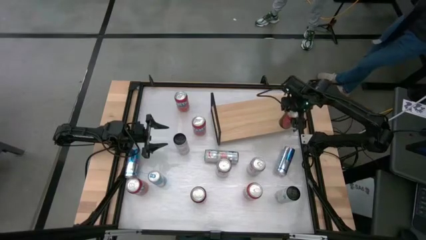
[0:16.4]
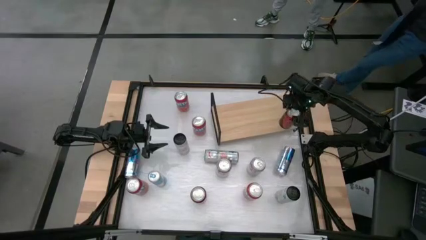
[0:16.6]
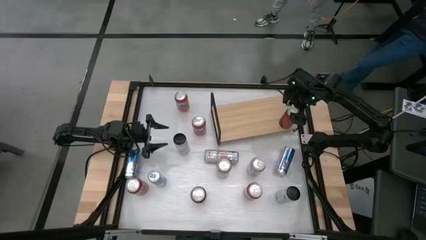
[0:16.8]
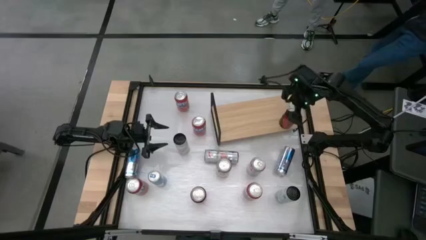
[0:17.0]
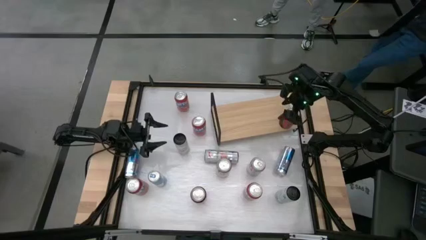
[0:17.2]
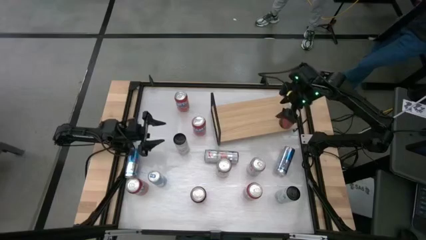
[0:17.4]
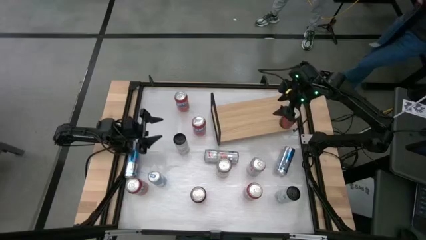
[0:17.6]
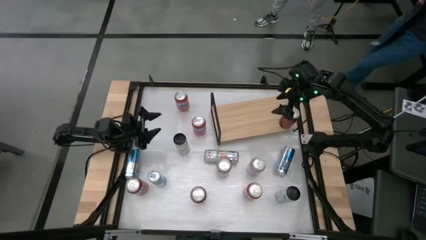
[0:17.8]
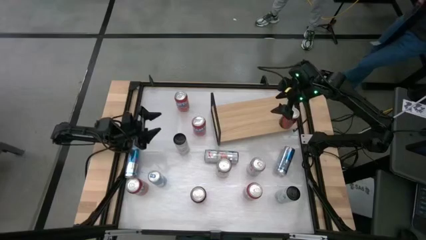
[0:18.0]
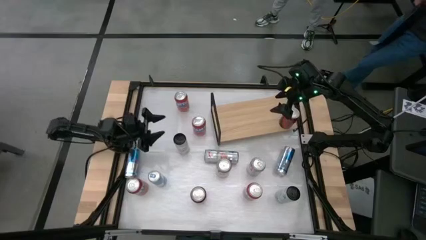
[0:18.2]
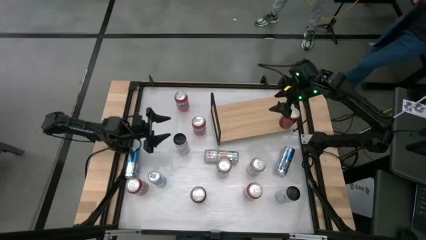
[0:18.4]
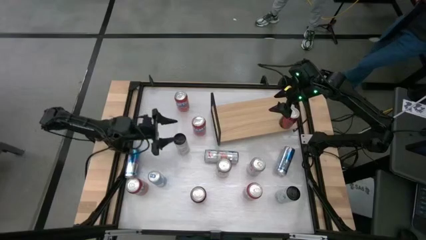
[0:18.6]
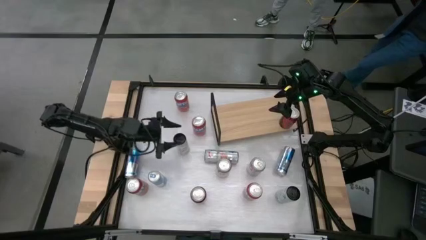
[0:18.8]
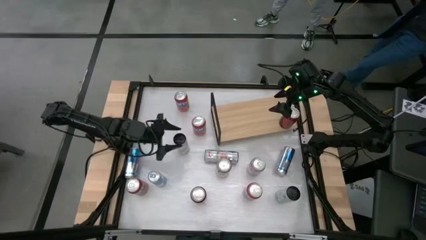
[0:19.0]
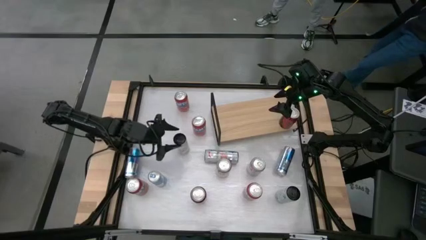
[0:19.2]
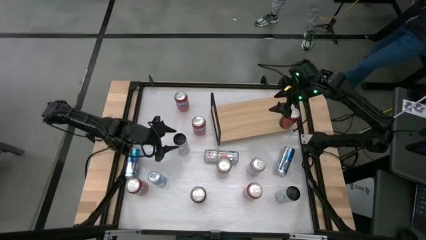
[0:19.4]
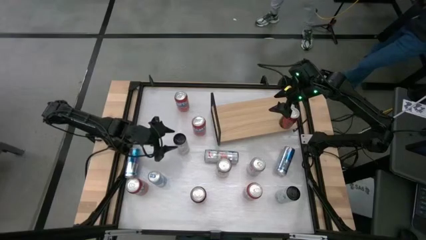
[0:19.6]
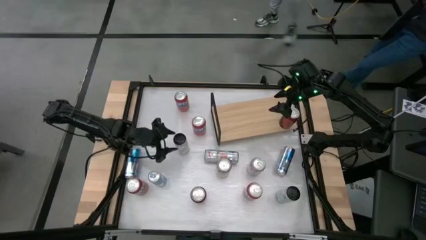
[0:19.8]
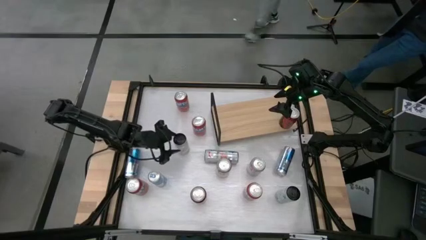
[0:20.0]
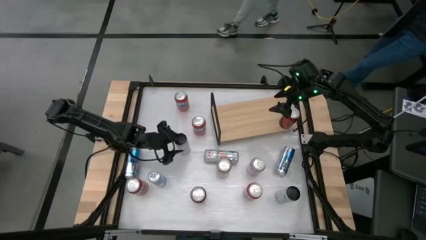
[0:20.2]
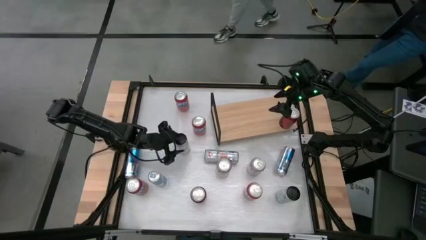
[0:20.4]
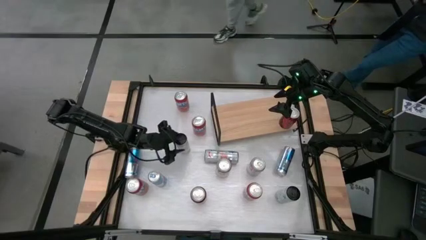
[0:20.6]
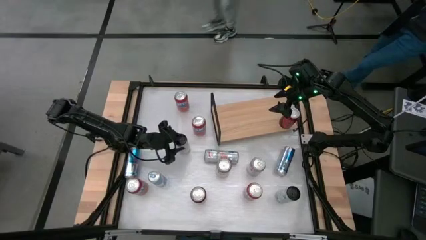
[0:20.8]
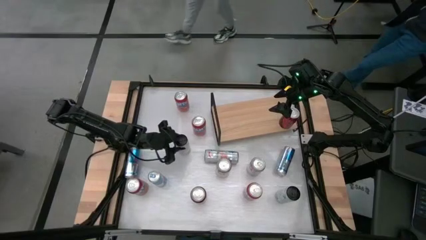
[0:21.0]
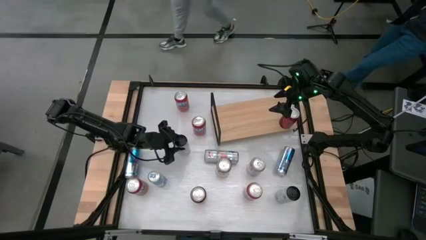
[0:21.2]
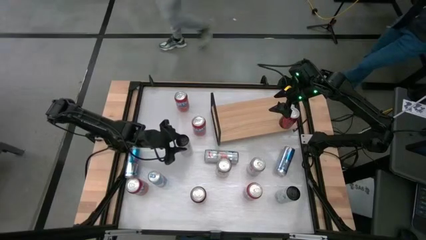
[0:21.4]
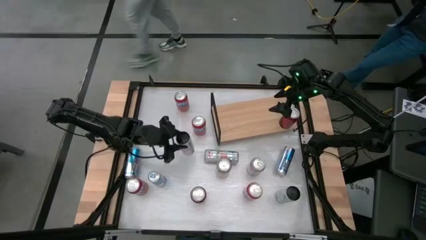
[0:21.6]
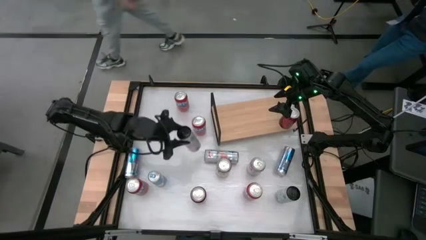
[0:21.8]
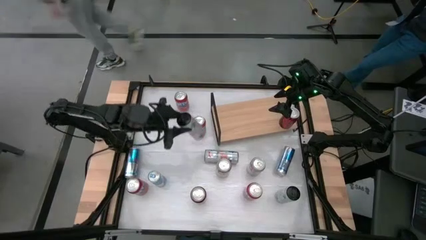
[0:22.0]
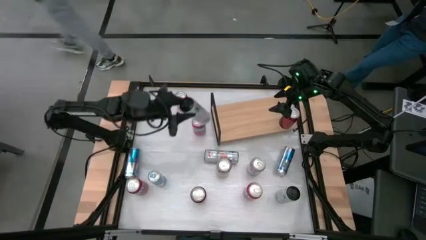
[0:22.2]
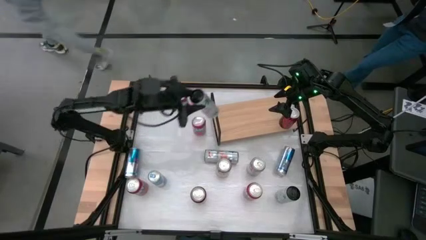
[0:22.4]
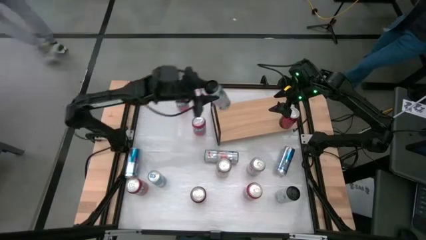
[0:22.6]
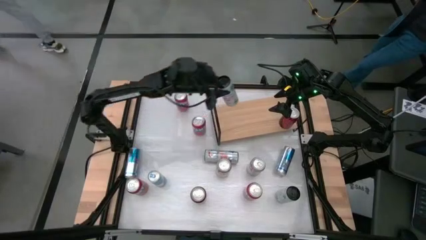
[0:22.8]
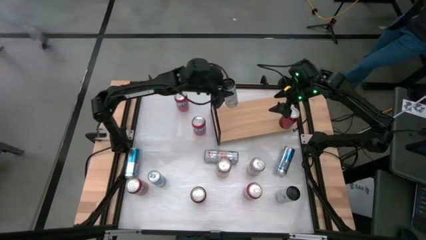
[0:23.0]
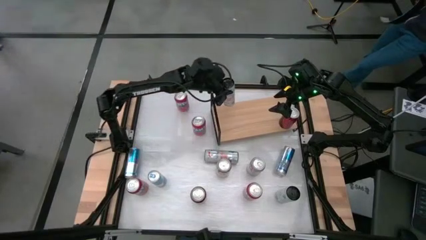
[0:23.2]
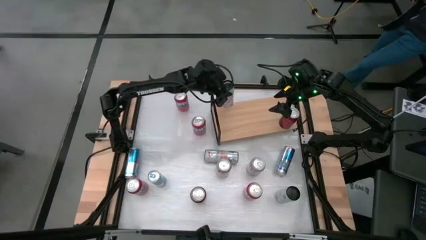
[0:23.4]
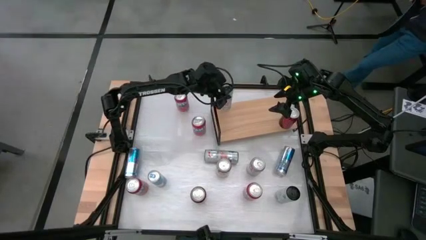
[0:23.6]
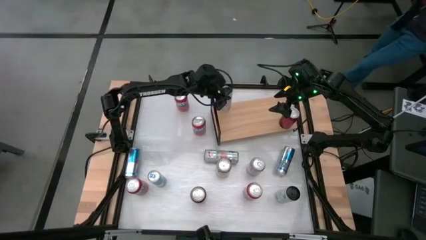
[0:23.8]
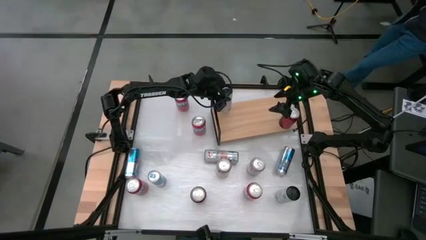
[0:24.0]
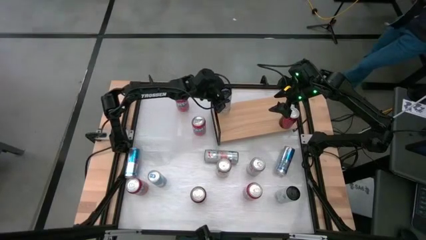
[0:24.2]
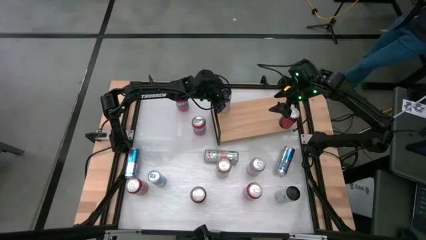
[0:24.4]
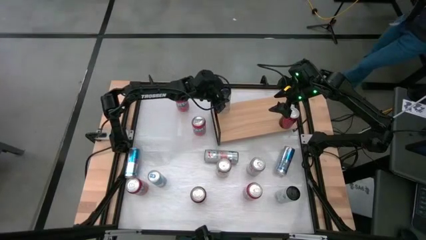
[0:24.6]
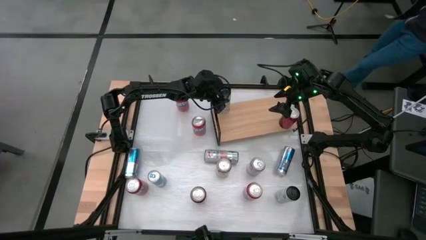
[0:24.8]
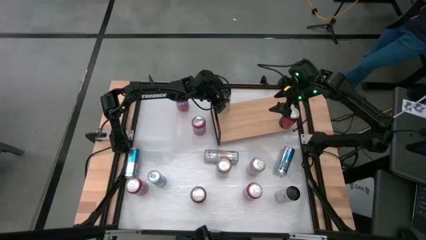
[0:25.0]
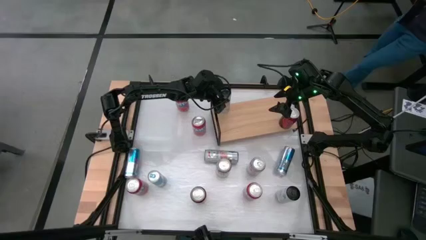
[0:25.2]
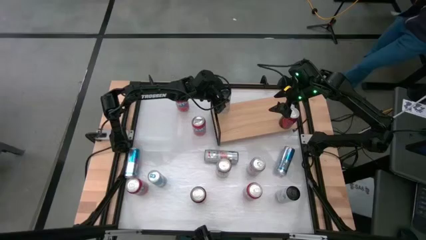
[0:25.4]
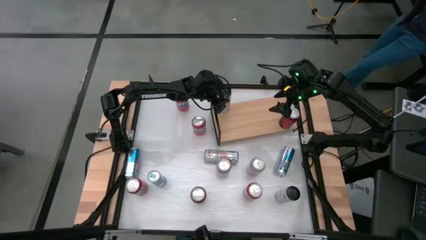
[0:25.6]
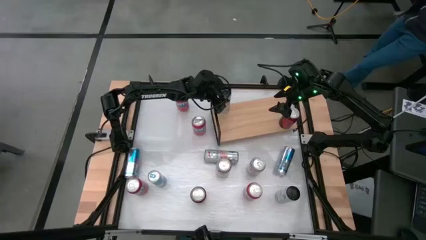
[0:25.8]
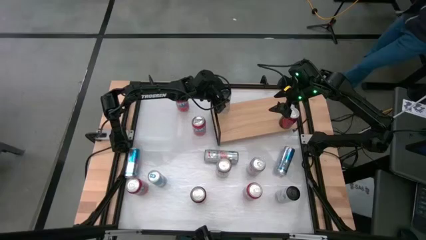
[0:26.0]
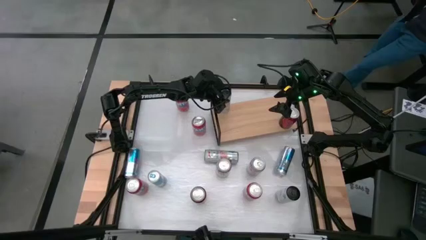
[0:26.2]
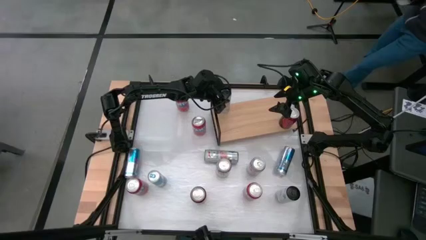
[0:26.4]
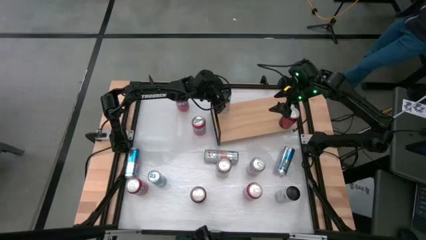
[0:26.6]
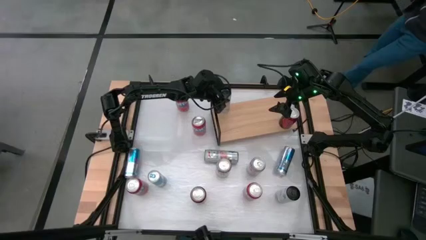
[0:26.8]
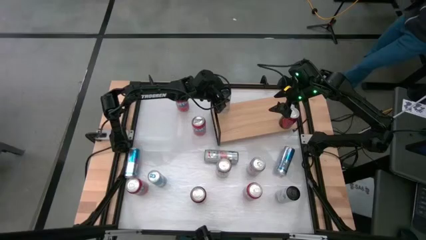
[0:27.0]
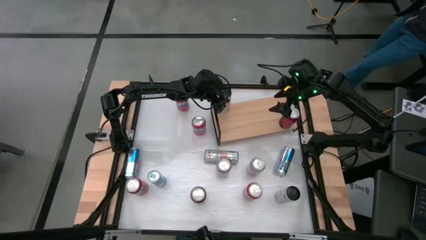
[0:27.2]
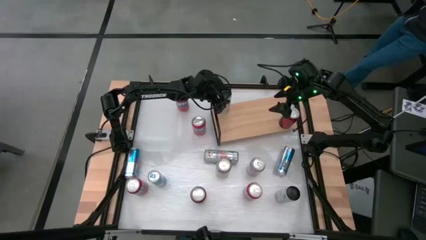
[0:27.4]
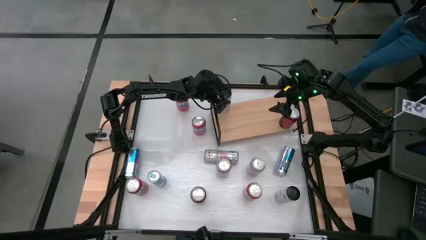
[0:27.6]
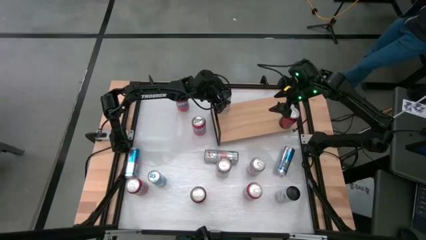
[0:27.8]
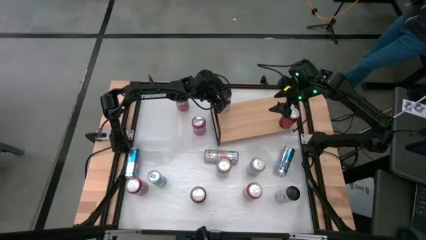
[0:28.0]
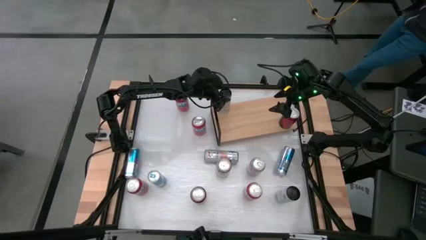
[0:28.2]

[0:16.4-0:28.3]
Task: Place canned beverage on shelf
Put the top left white black soda can on the shelf

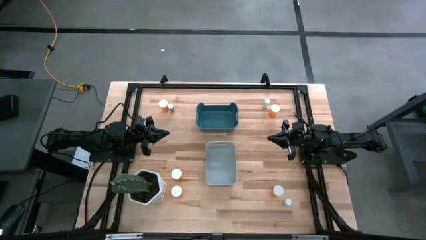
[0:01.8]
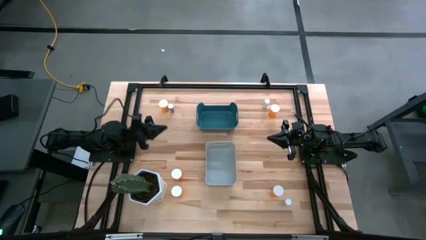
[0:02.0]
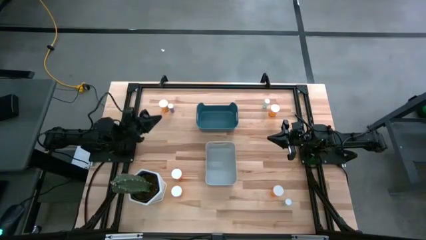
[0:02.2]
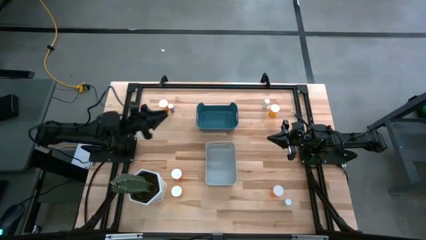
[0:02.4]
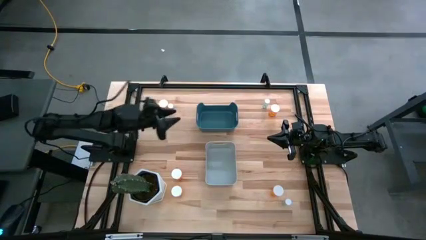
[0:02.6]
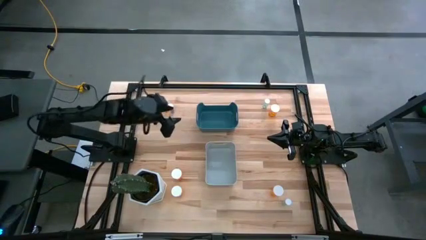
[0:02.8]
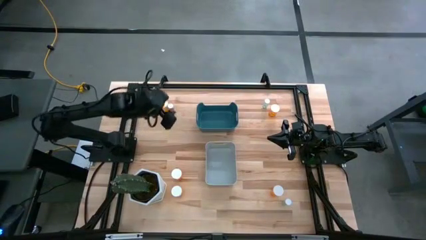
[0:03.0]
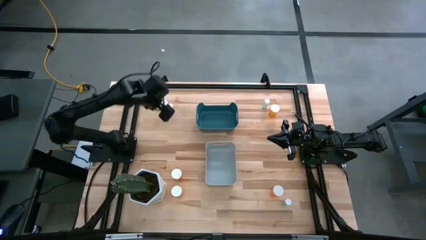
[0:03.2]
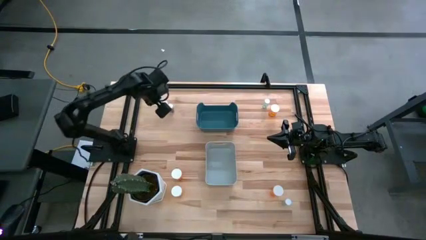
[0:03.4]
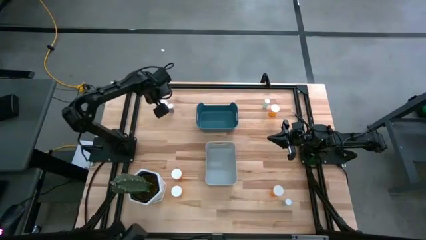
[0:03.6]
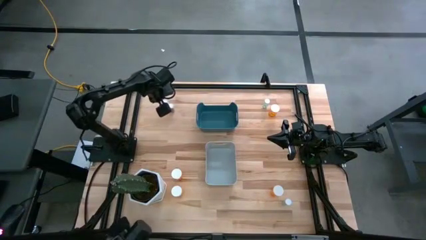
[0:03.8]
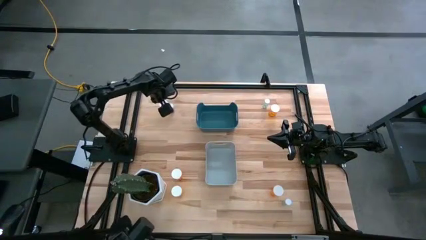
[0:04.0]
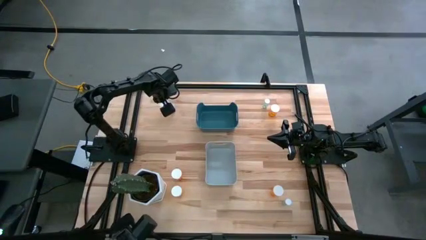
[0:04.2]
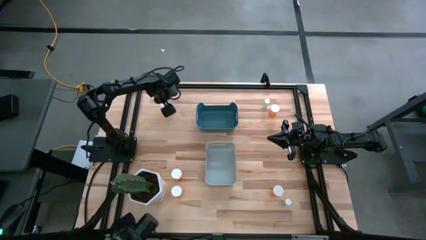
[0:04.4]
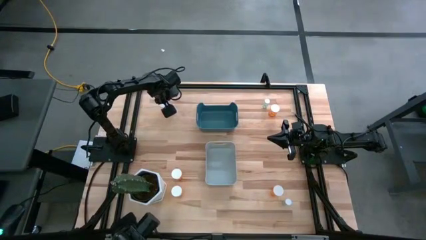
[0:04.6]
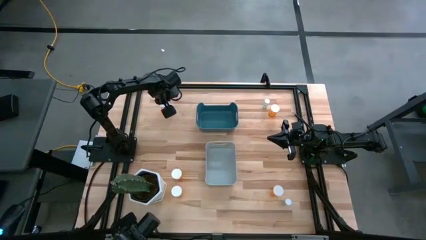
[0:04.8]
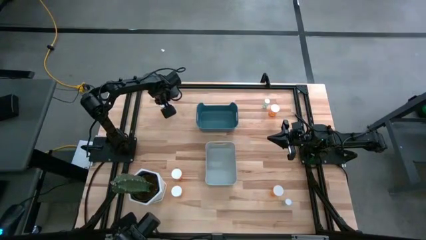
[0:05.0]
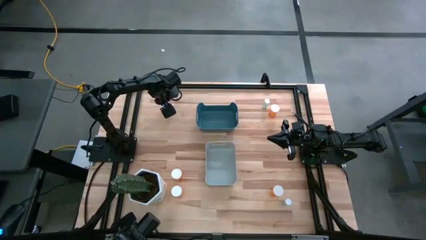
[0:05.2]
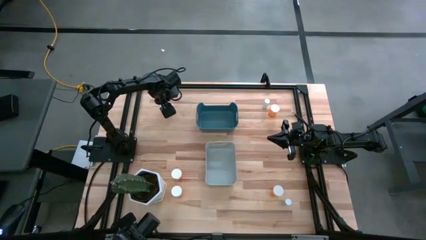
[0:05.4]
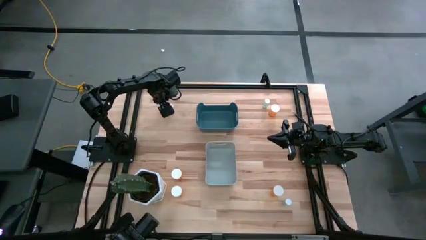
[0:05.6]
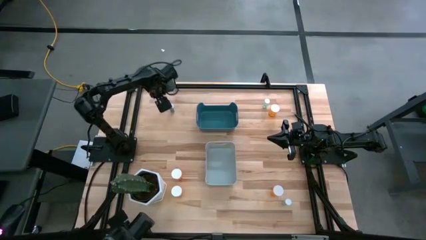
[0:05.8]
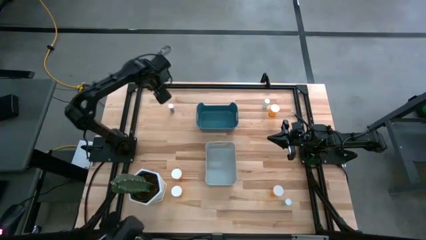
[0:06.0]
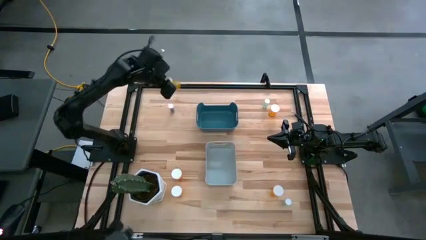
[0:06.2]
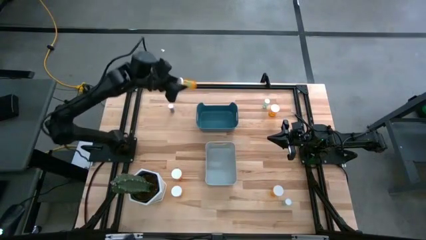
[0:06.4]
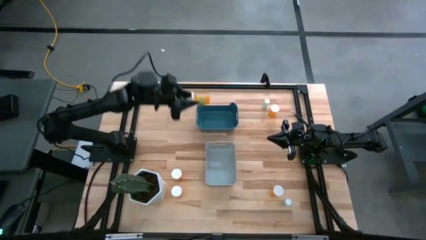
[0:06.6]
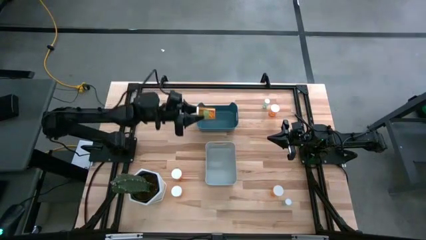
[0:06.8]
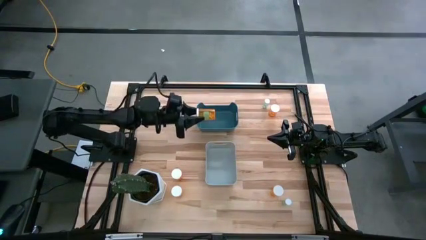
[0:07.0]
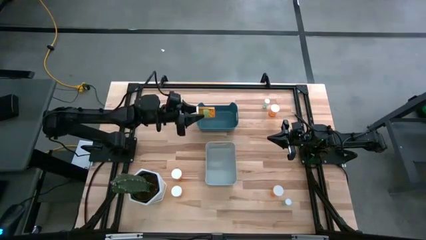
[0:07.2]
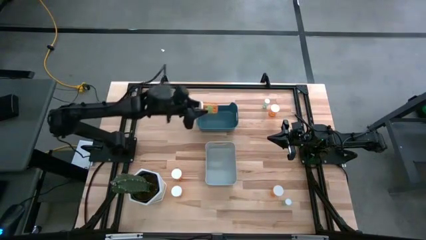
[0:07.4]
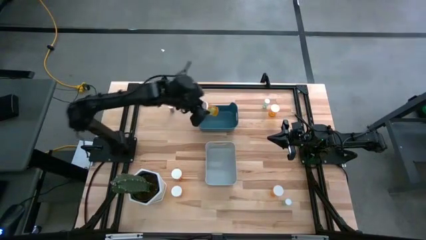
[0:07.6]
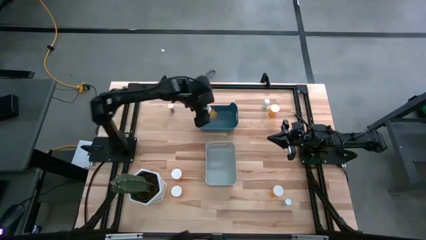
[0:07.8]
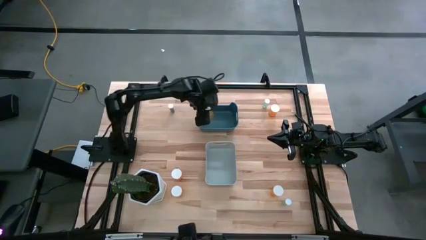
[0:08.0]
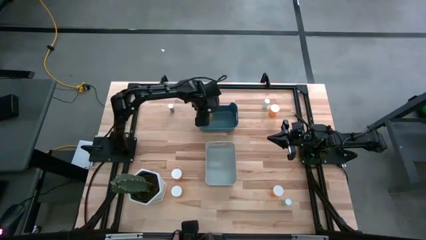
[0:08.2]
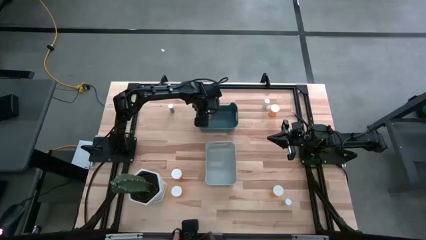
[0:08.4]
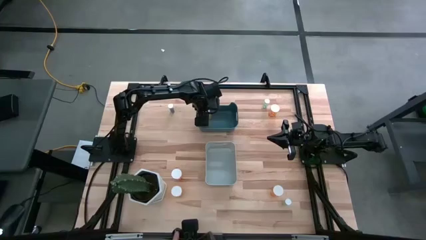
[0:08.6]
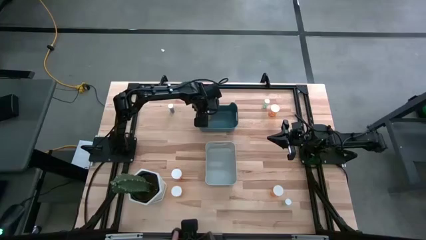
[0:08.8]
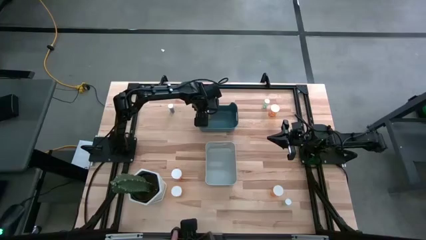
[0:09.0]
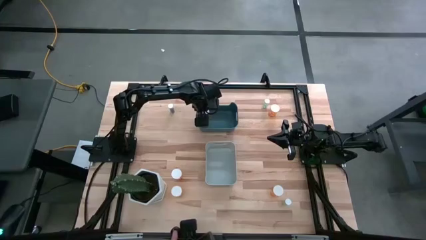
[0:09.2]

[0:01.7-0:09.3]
Task: Pick and place medicine bottles into bin by pill shape (circle, oval)
Put the orange capsule bottle into the blue bin
